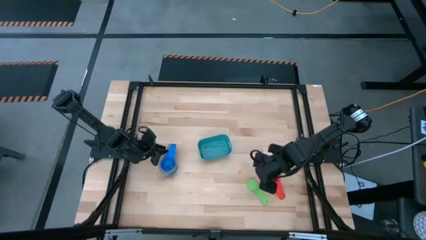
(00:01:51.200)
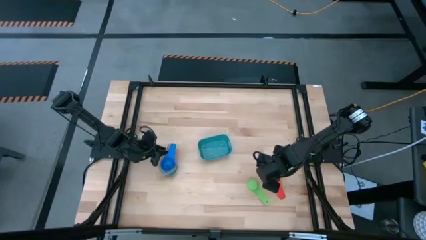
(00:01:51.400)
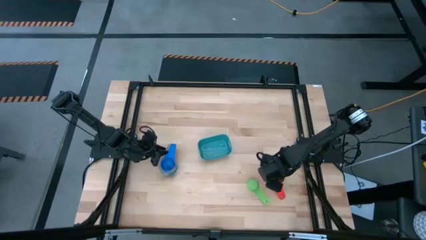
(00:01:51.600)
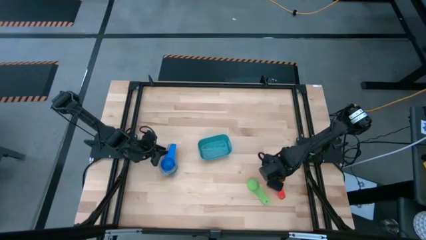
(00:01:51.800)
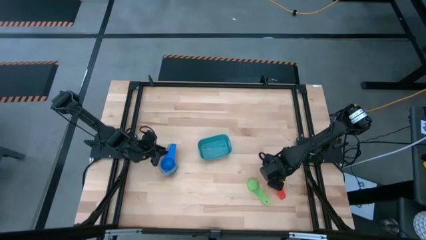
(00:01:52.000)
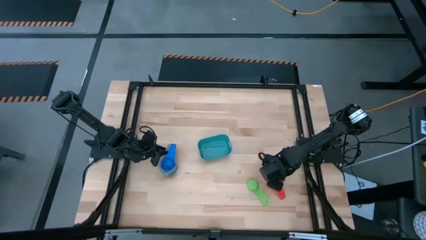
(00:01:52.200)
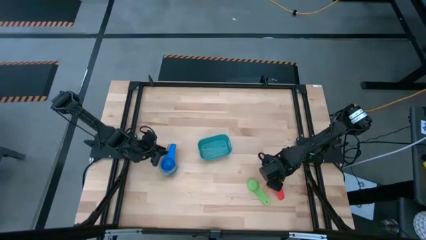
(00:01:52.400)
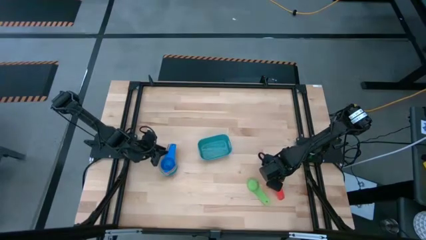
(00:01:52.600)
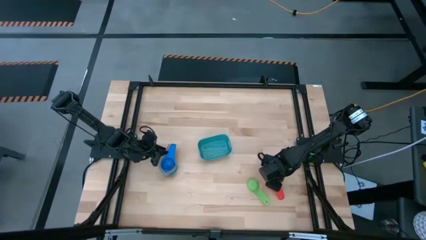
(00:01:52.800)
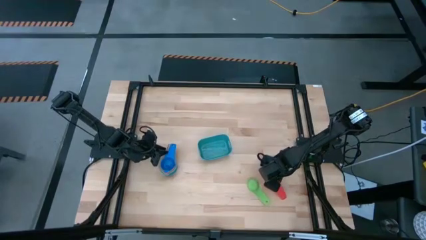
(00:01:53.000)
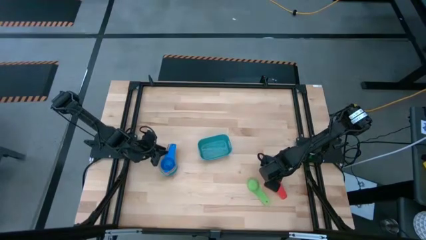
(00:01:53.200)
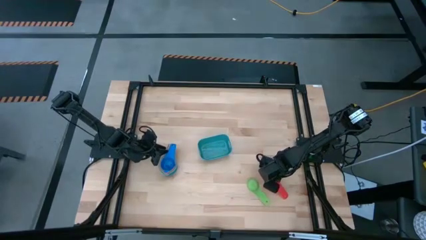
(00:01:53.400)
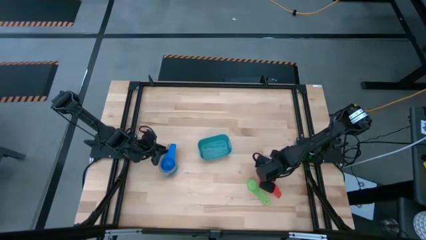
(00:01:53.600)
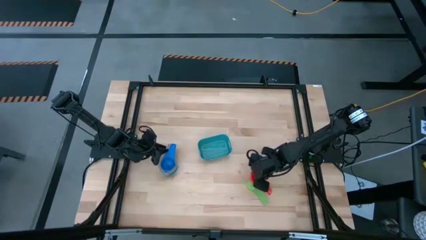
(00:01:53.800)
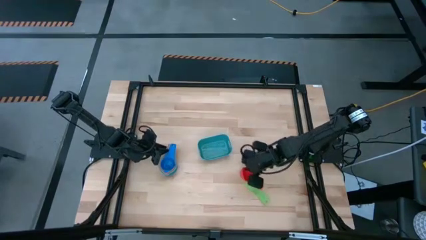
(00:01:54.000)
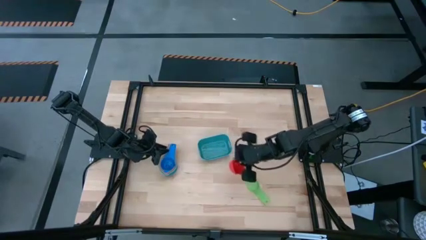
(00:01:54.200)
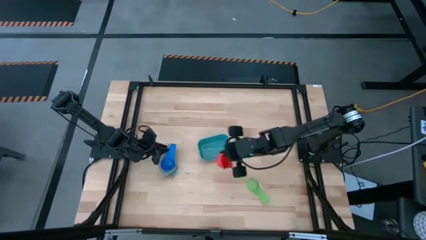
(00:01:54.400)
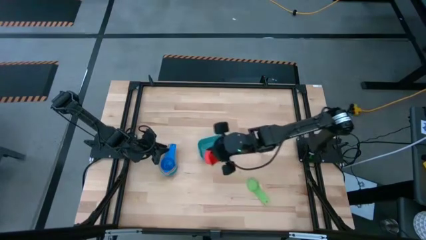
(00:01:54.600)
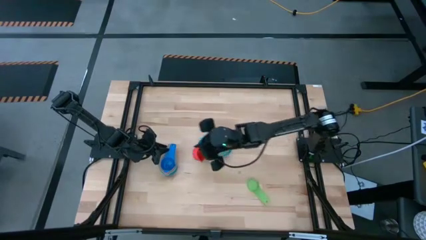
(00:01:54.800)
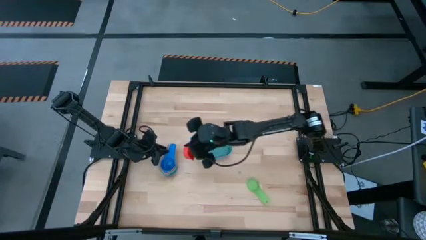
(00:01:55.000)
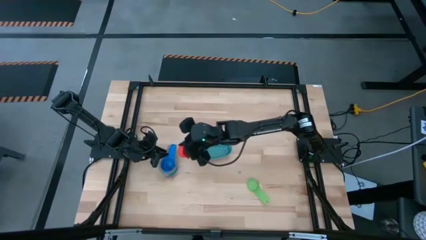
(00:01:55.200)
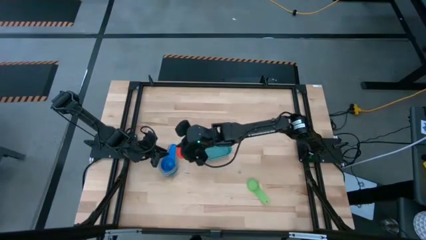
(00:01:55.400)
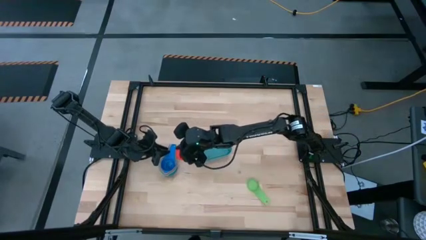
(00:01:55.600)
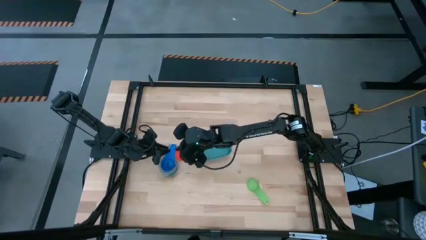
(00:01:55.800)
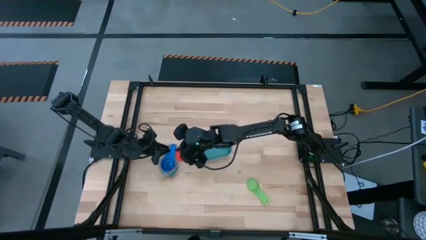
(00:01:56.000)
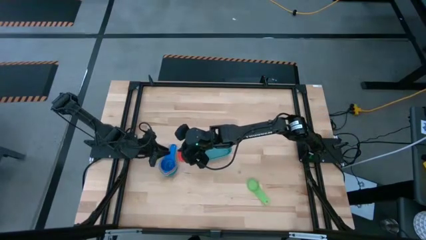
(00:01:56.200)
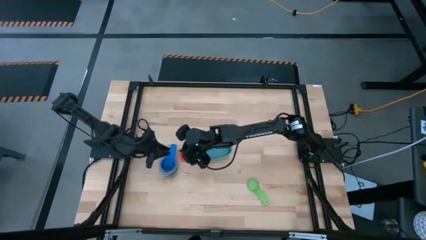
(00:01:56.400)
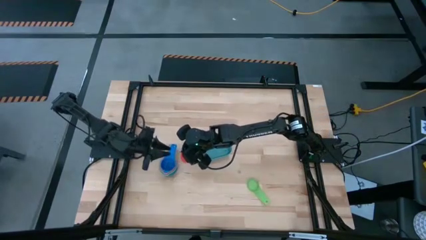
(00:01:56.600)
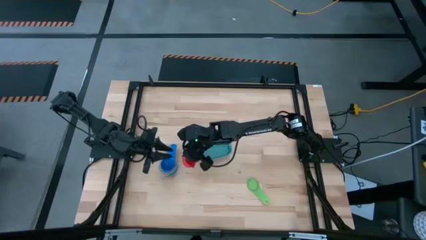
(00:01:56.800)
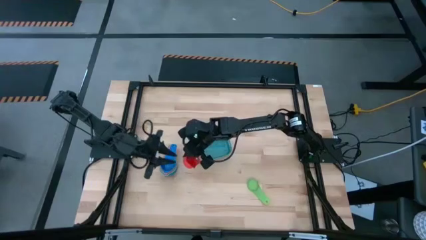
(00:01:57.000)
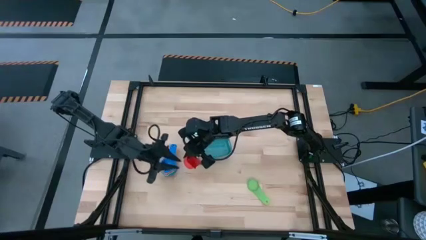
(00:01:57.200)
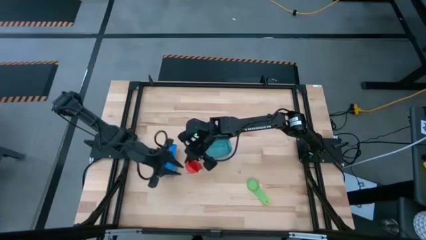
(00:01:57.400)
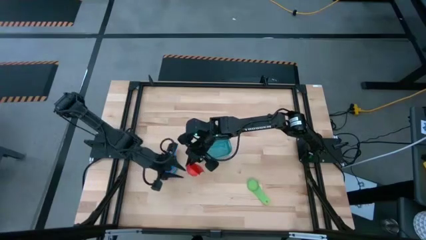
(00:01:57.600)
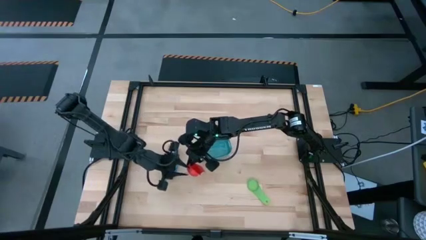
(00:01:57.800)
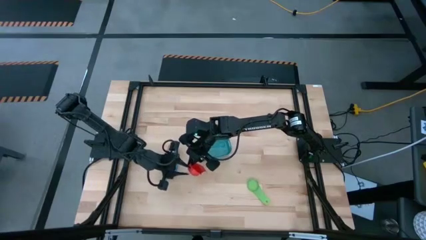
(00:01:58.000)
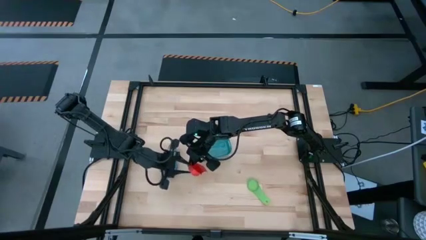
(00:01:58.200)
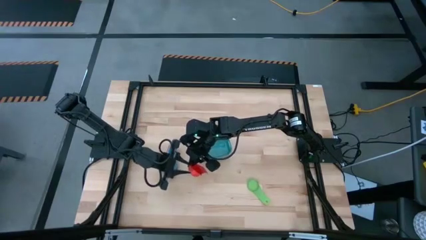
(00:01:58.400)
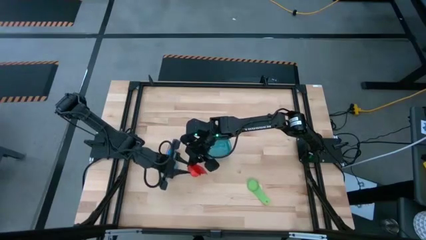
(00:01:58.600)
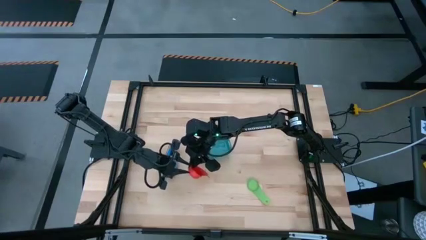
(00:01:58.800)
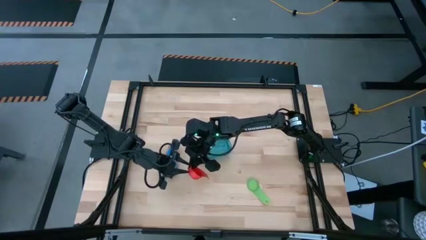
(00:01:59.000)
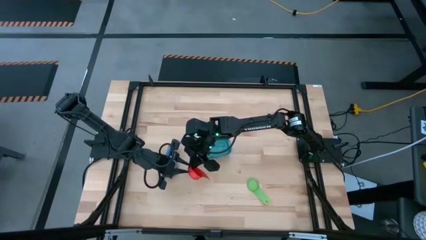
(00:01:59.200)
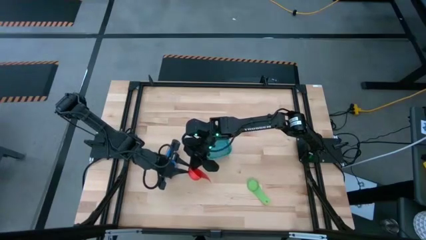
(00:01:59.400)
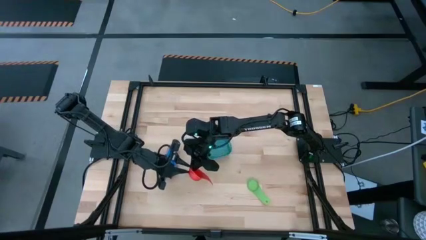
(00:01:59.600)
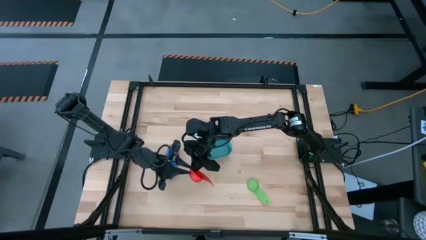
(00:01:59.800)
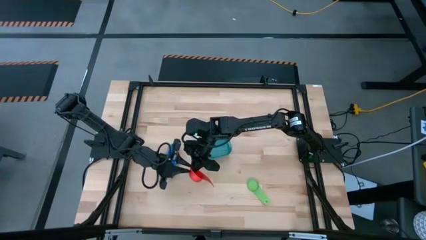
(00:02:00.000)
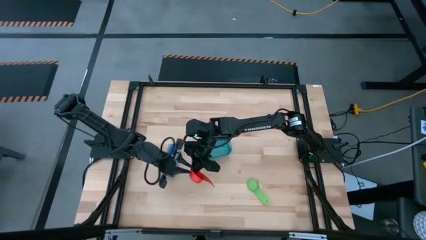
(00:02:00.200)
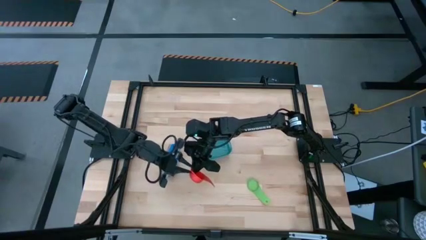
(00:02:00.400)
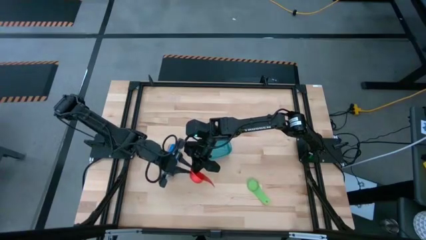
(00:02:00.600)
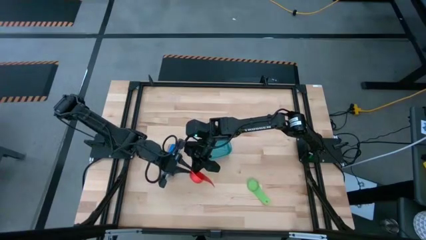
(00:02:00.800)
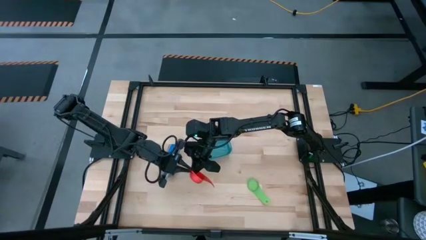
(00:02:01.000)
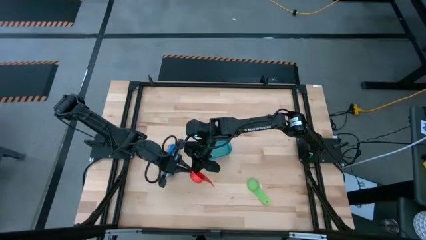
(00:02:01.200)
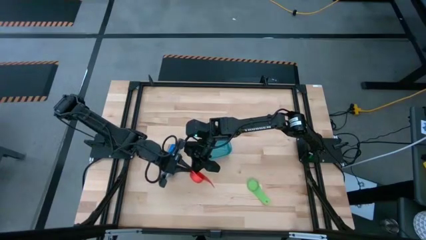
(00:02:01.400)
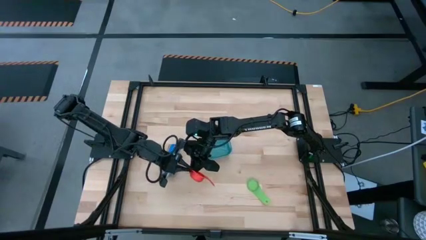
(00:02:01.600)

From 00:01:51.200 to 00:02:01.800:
Task: Nest measuring cups in basket
Stack the red measuring cup on top of the blue measuring cup

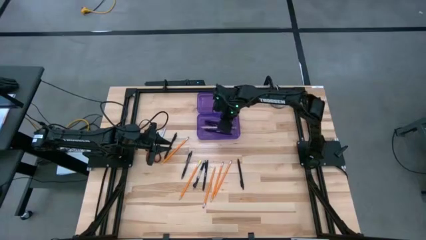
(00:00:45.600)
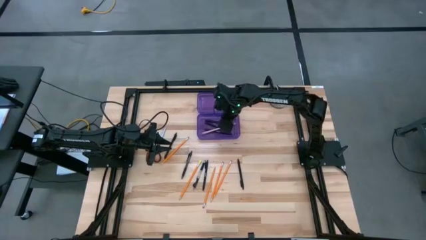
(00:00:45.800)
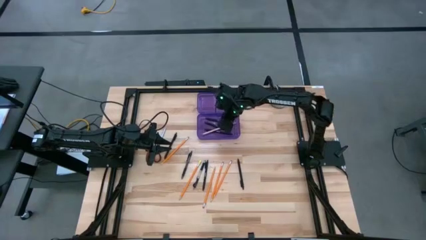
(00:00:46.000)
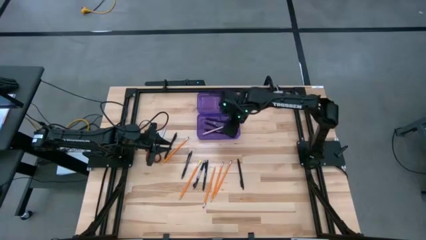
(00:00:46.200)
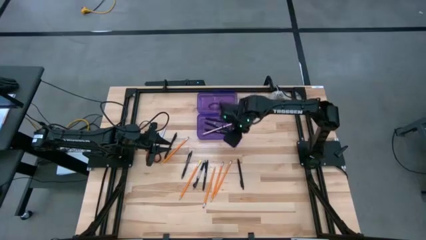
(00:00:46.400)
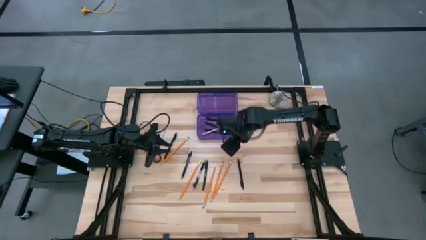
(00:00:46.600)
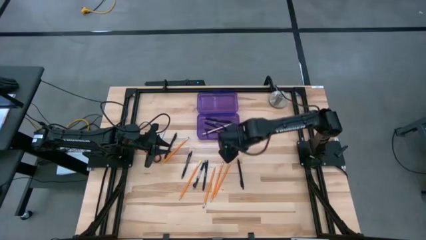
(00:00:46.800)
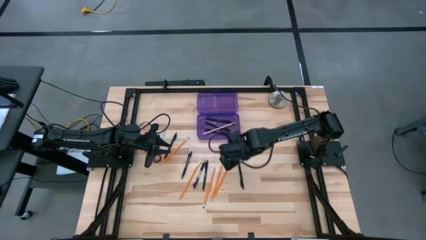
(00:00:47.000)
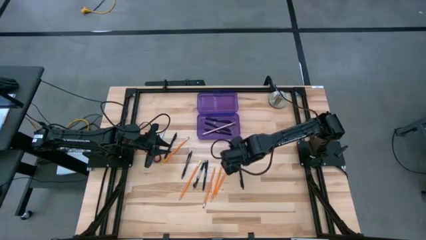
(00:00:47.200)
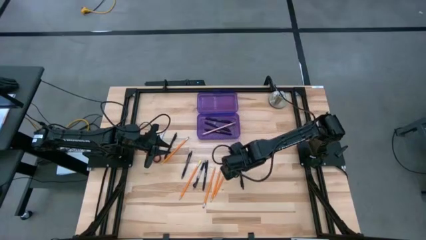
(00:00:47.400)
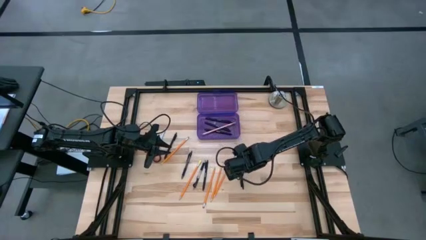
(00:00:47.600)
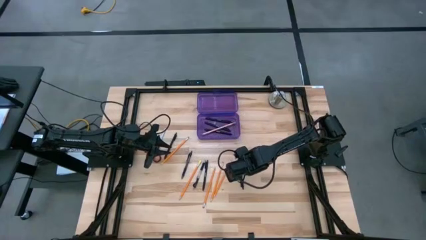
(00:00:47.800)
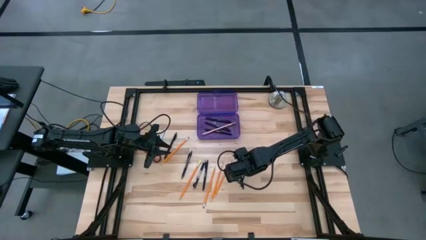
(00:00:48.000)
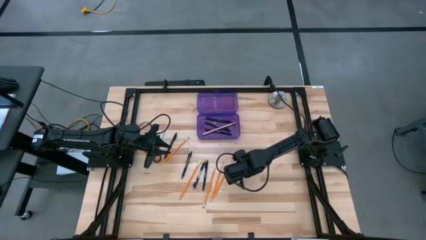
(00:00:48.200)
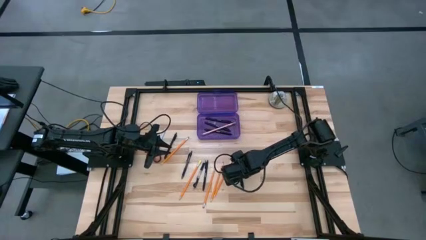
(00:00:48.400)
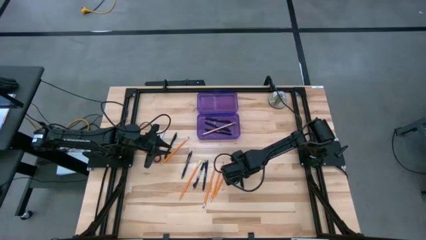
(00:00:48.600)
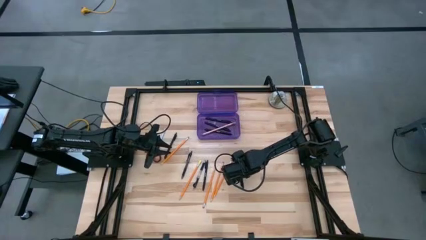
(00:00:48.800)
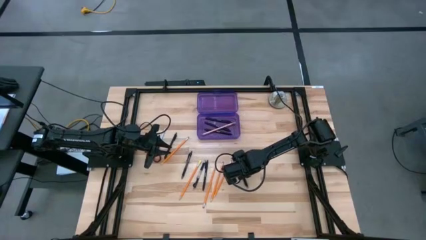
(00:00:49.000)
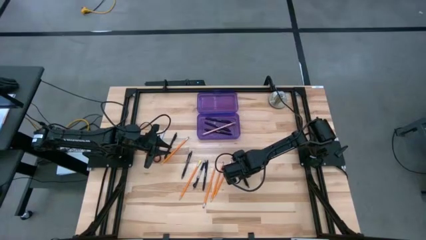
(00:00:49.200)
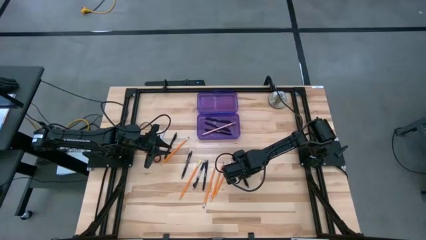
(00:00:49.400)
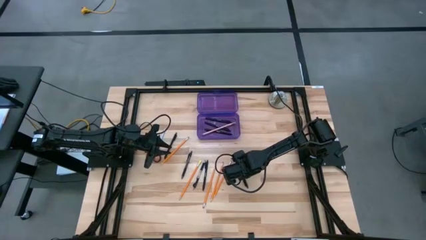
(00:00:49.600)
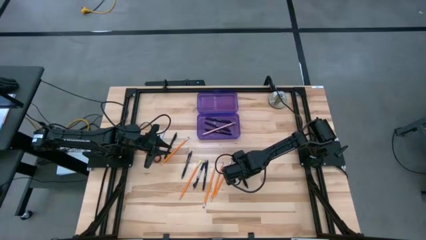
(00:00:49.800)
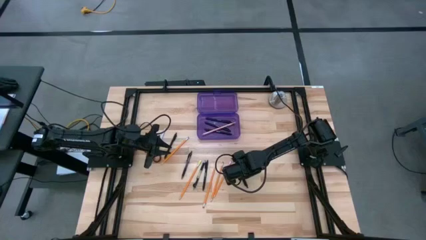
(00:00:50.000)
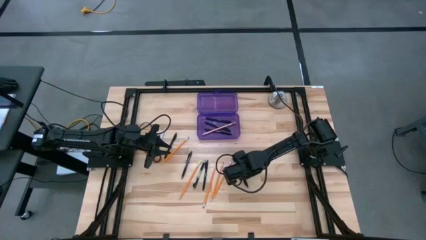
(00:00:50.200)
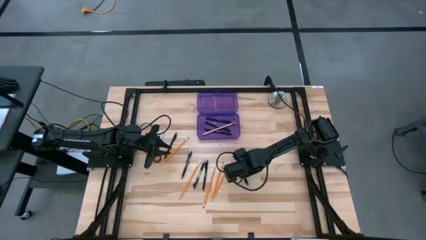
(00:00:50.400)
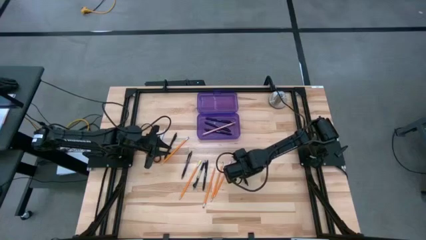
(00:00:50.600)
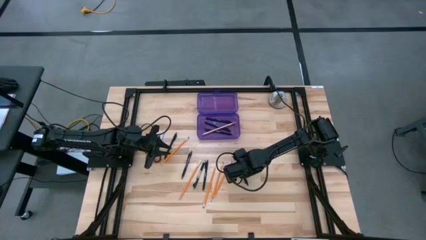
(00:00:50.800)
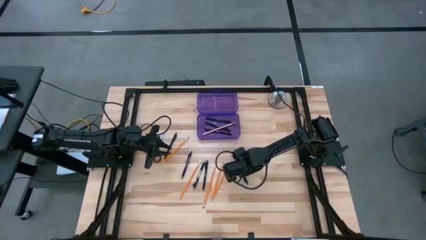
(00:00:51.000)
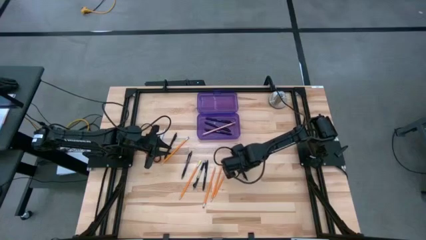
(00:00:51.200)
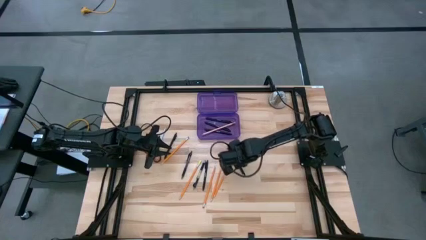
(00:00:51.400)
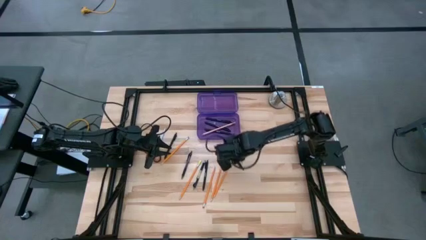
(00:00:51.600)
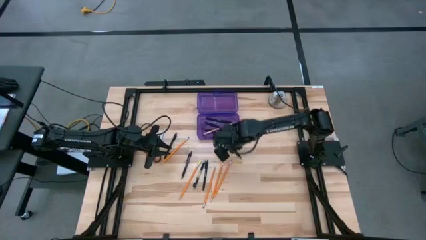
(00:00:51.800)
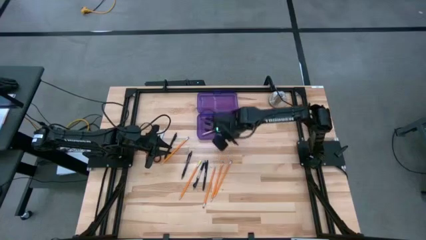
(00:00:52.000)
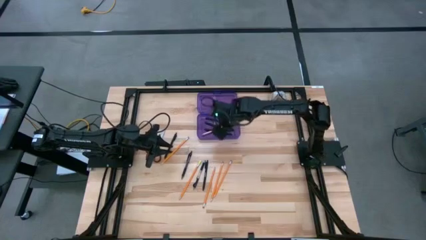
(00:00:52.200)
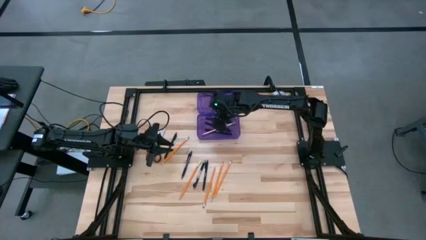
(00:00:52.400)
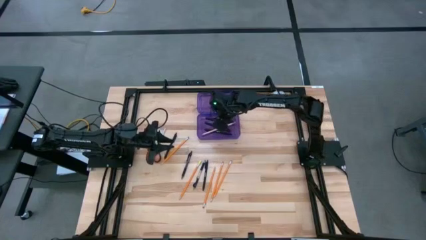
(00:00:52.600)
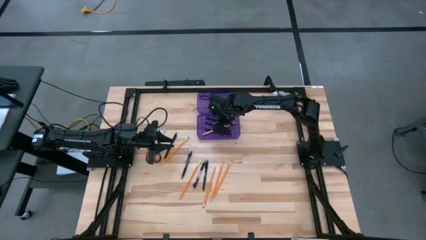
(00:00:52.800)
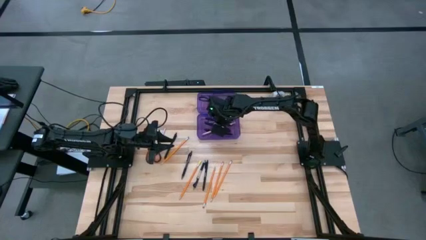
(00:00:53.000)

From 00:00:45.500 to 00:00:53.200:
Task: Pick & place school supplies into a supply box
Put the black pen into the the purple supply box
